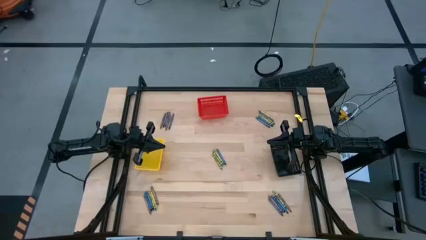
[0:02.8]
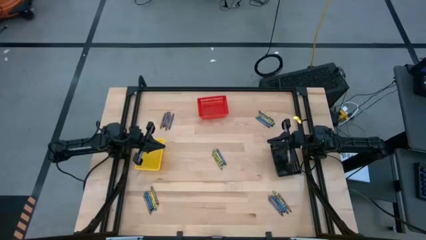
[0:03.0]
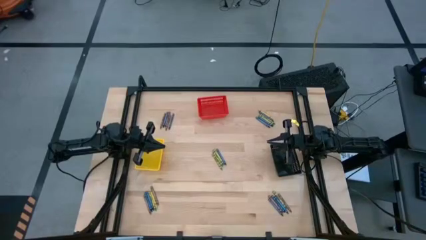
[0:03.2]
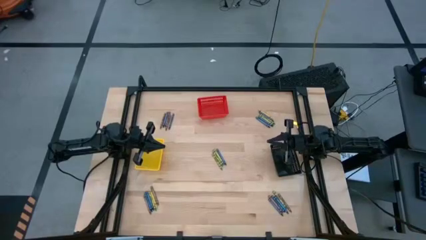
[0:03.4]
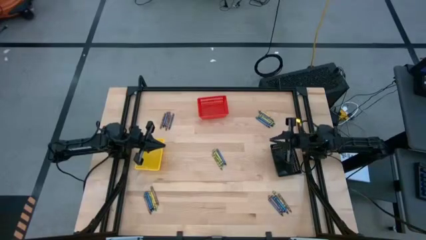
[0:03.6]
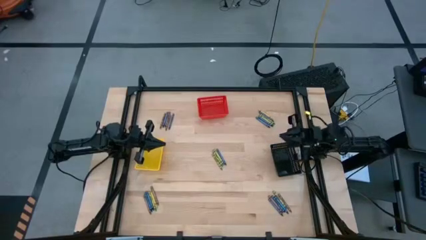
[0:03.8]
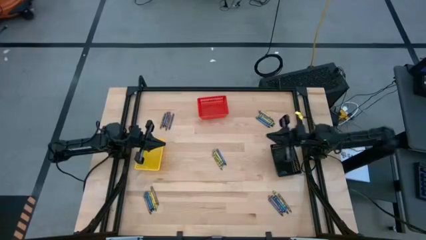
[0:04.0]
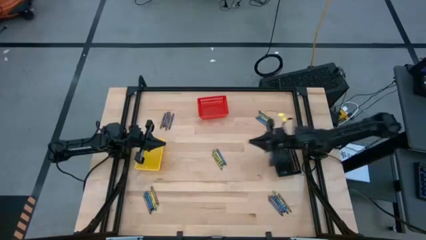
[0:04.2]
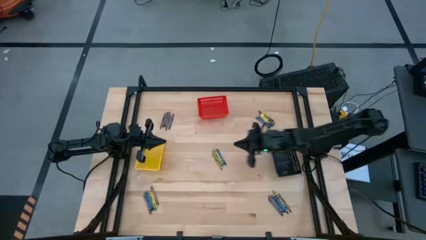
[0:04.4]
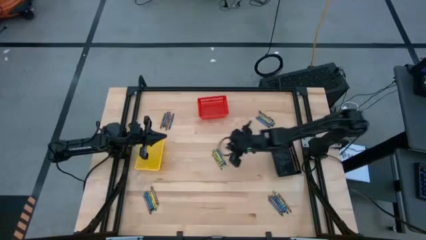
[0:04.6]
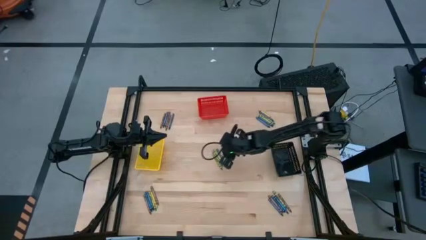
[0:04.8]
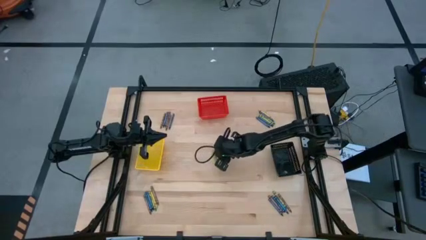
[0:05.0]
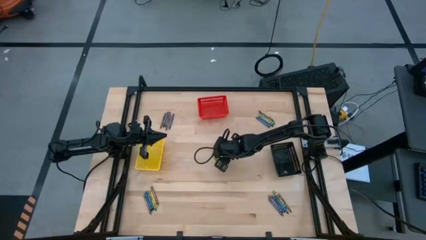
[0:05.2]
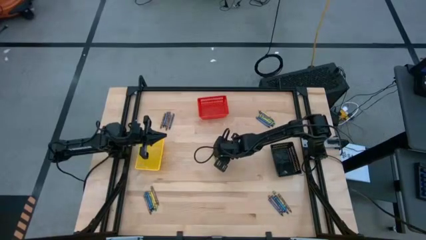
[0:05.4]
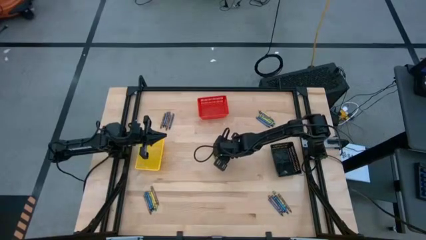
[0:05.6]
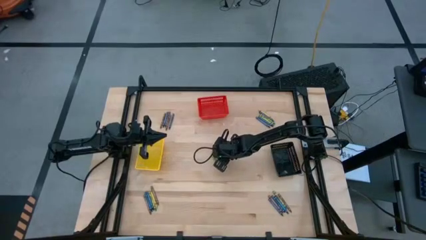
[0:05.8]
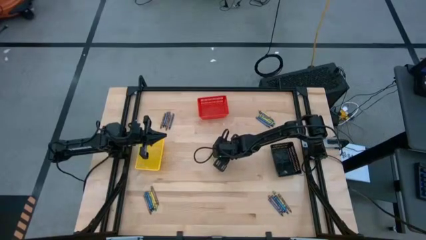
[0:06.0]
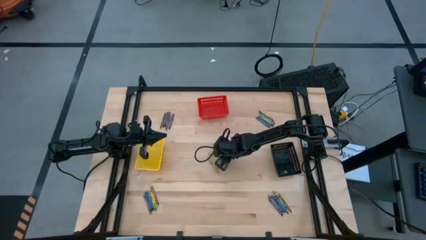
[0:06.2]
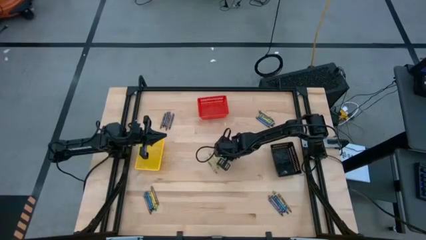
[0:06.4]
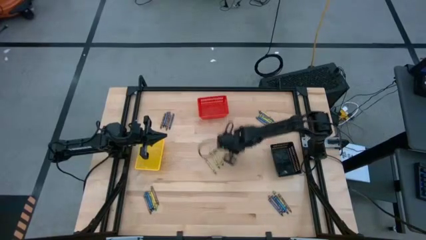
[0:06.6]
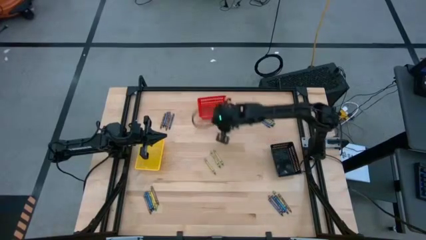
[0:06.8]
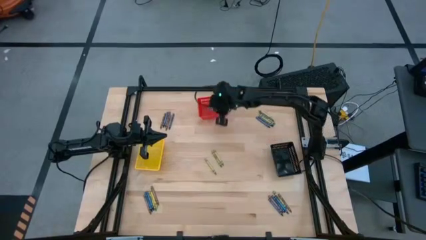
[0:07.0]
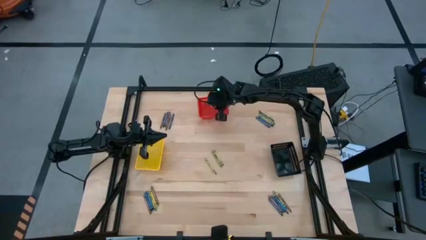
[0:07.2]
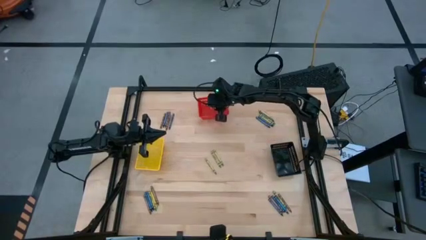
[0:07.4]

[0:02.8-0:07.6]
Task: Sort crayons
Put the blue crayon into the red bin

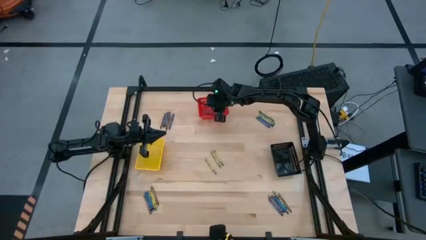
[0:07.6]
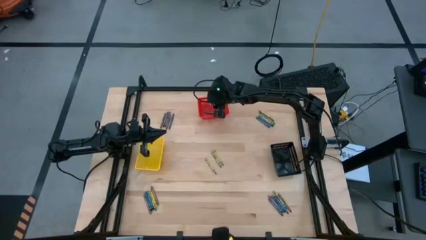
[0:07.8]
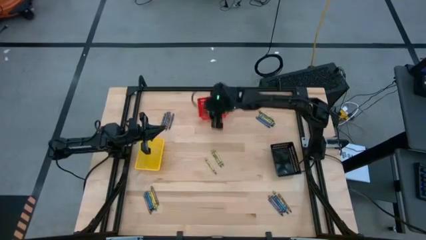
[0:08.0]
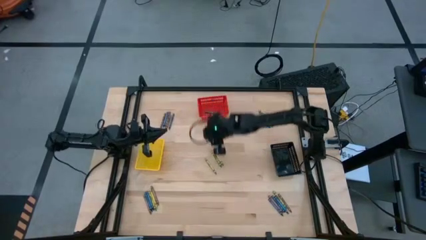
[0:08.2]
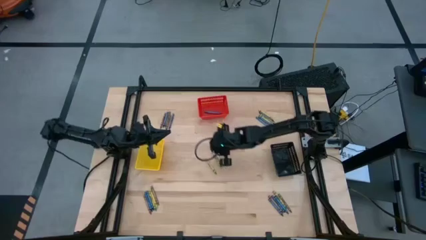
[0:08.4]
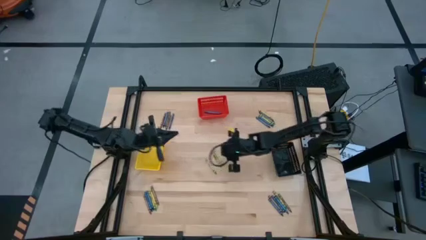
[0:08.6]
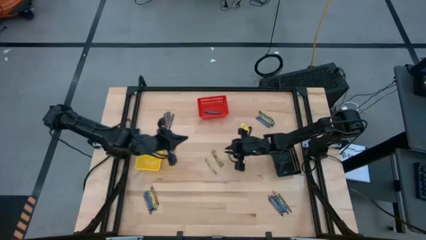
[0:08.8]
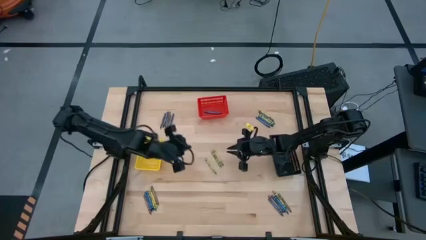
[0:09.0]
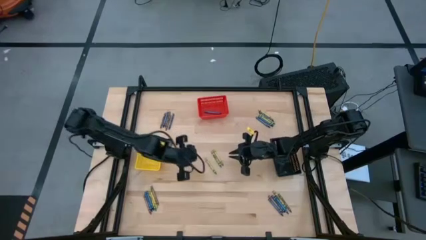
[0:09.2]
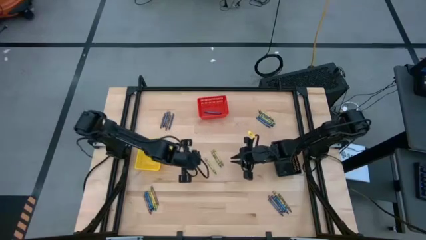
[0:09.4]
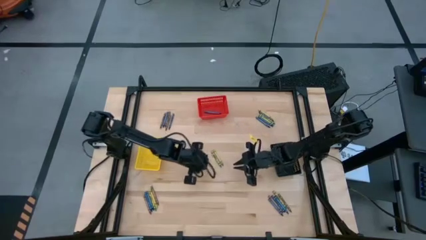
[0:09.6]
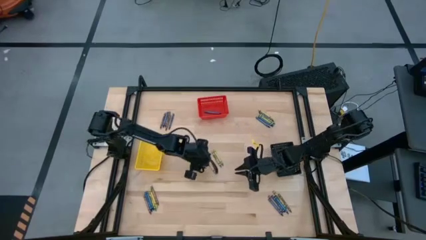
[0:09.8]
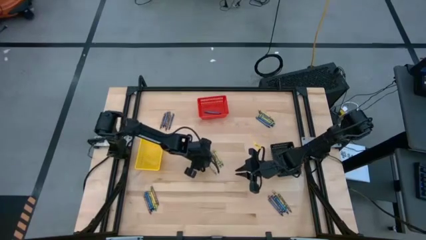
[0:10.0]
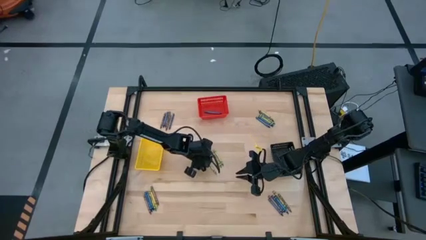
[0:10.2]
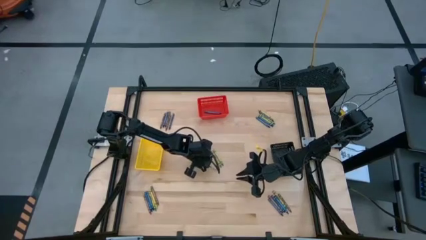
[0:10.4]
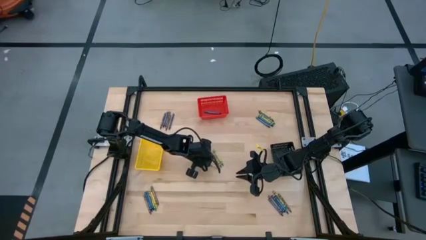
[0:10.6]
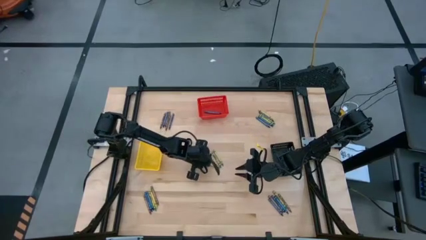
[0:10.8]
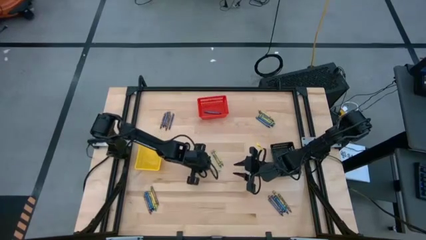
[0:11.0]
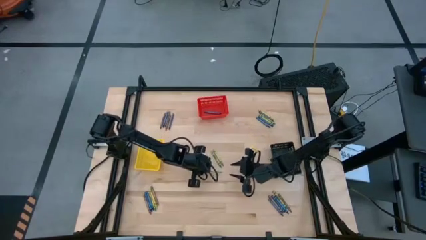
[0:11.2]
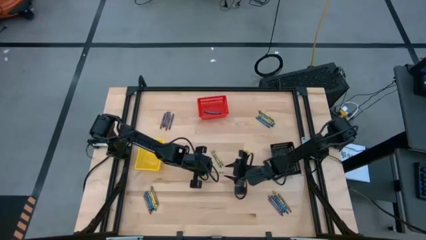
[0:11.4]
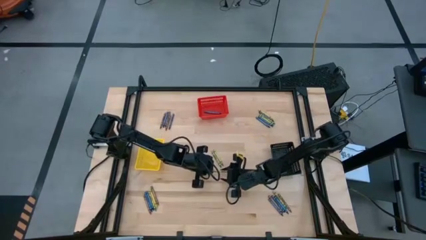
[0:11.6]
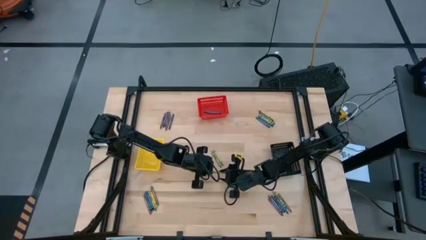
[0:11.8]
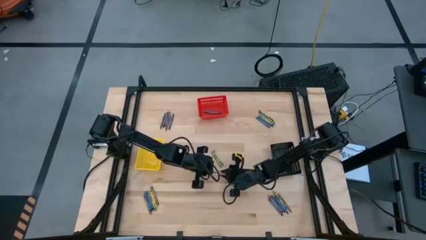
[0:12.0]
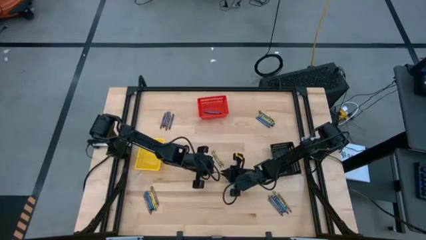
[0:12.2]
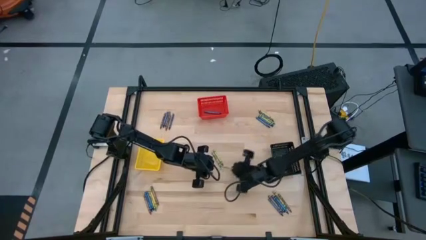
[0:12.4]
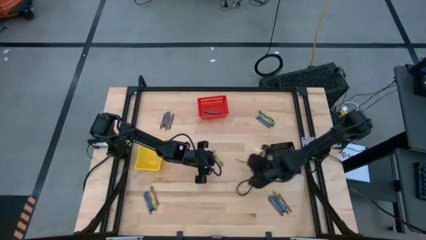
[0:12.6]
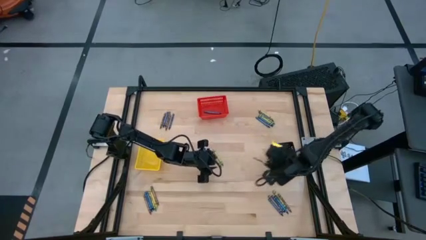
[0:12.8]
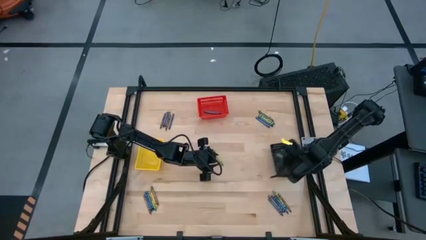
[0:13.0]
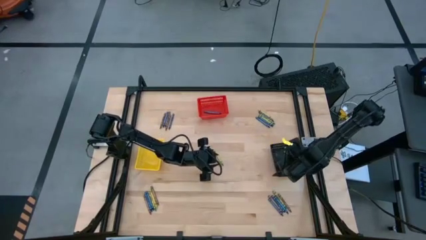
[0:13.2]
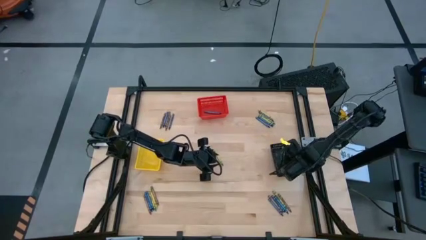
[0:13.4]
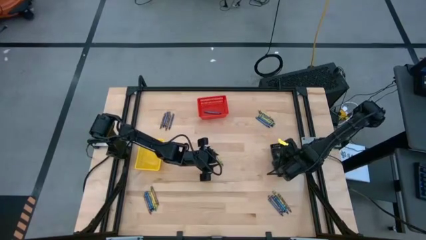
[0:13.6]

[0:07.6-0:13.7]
Put the green crayon into the black basket

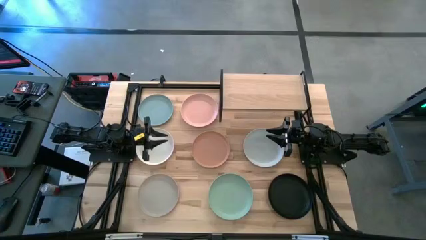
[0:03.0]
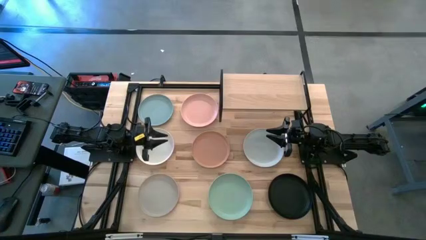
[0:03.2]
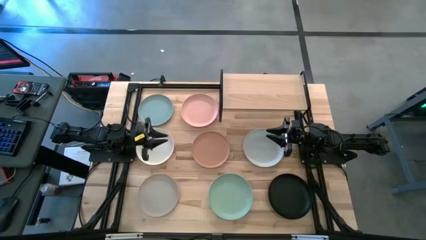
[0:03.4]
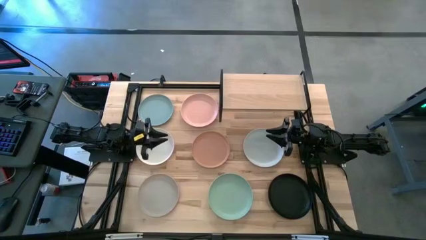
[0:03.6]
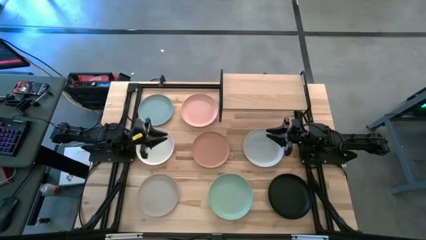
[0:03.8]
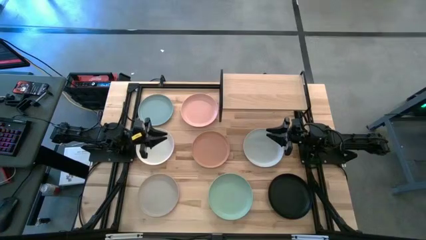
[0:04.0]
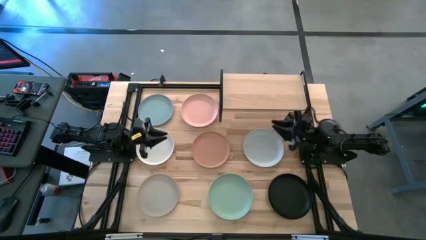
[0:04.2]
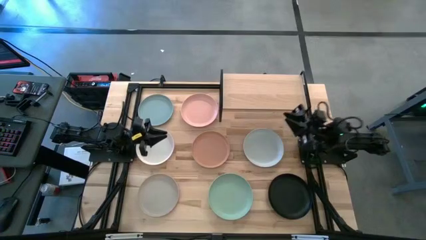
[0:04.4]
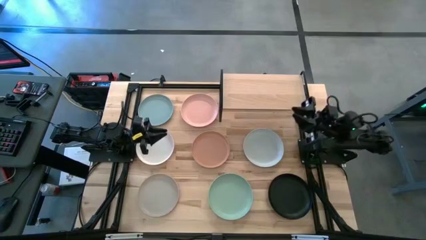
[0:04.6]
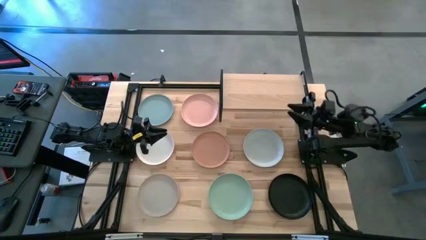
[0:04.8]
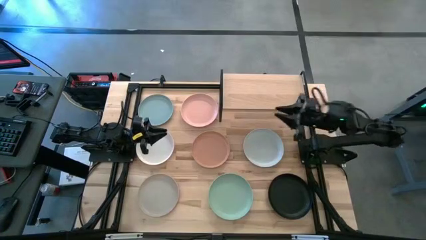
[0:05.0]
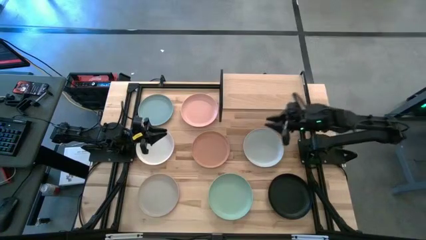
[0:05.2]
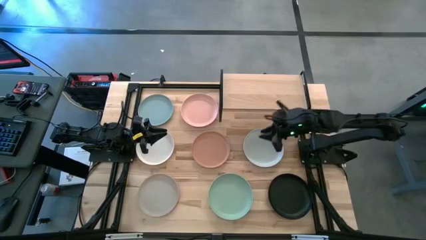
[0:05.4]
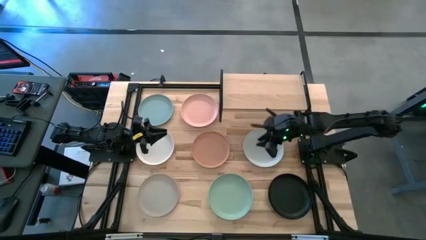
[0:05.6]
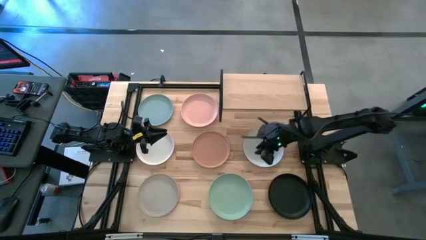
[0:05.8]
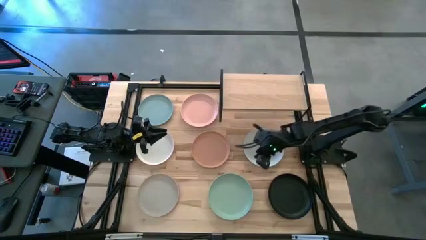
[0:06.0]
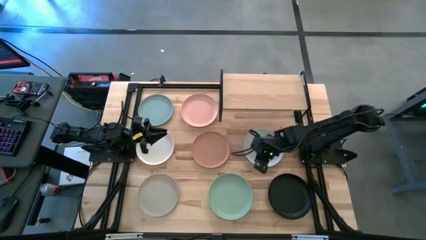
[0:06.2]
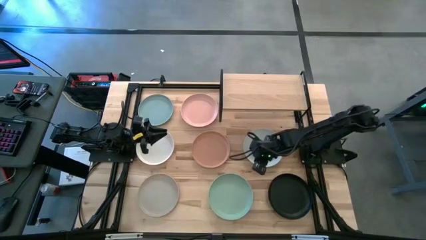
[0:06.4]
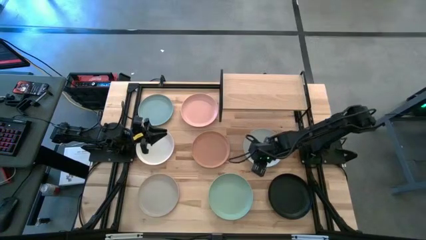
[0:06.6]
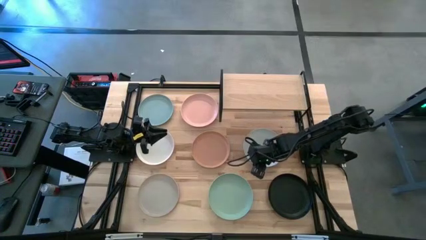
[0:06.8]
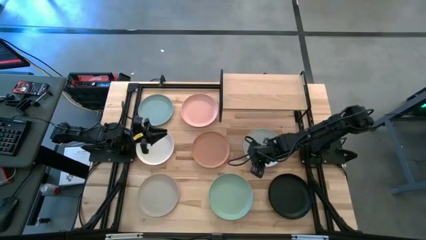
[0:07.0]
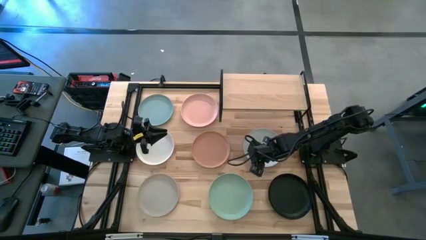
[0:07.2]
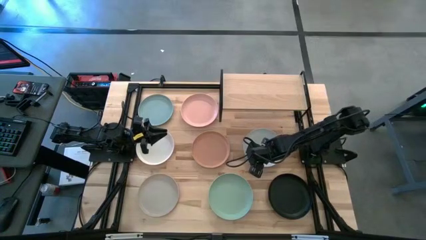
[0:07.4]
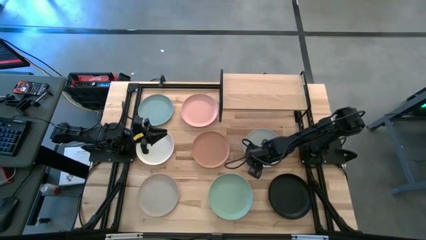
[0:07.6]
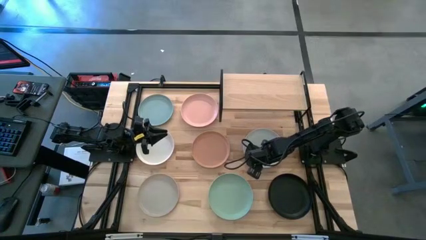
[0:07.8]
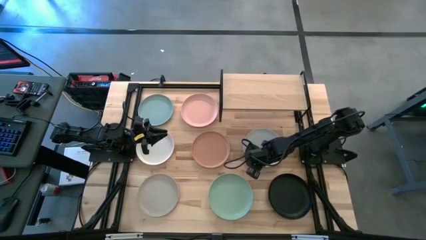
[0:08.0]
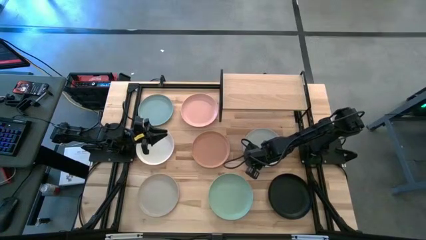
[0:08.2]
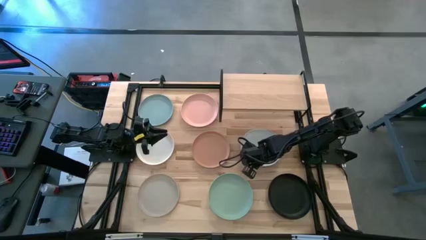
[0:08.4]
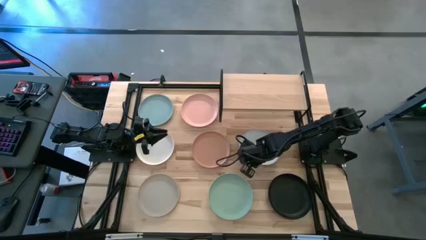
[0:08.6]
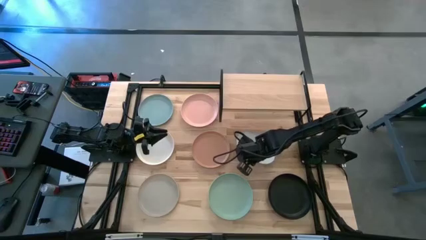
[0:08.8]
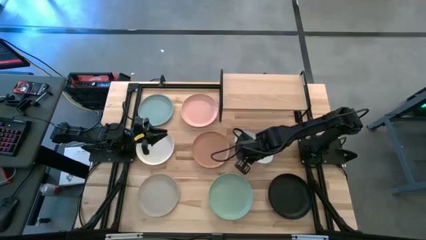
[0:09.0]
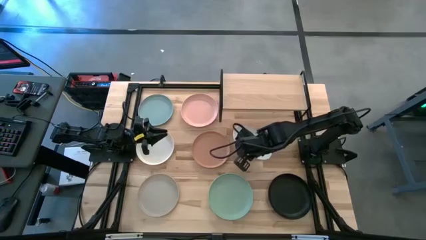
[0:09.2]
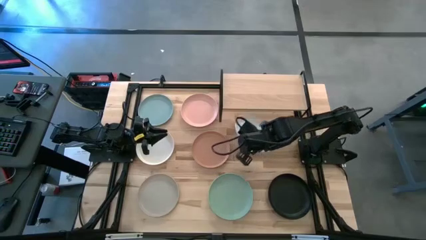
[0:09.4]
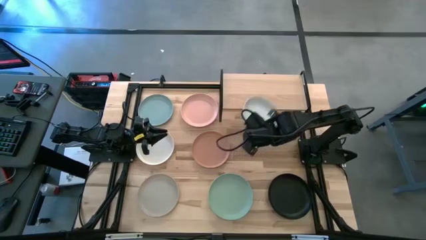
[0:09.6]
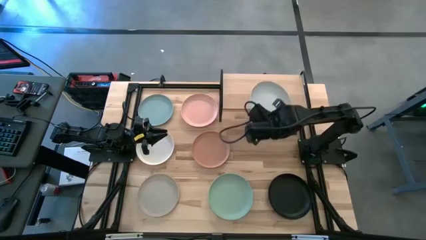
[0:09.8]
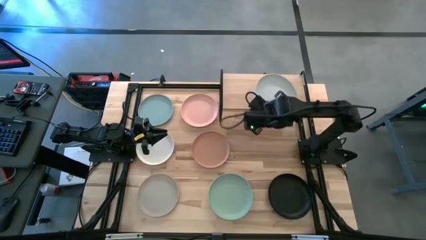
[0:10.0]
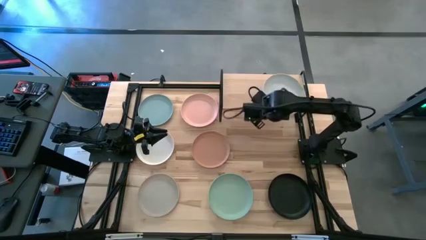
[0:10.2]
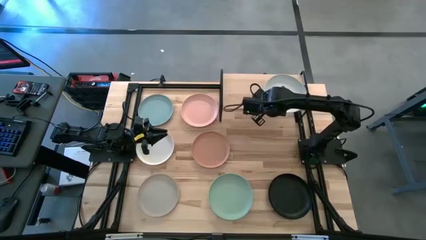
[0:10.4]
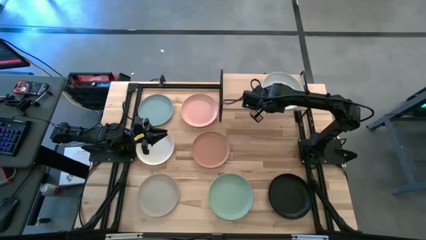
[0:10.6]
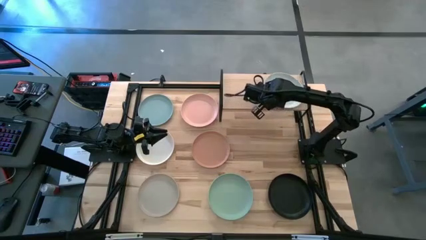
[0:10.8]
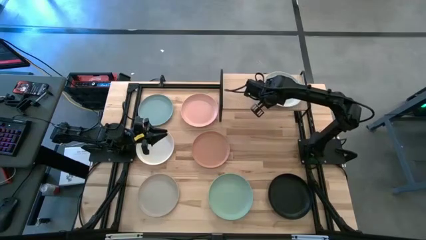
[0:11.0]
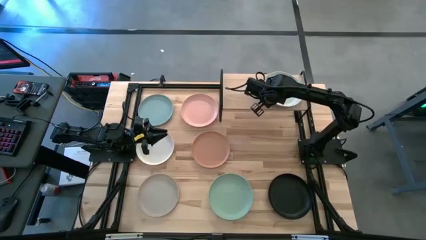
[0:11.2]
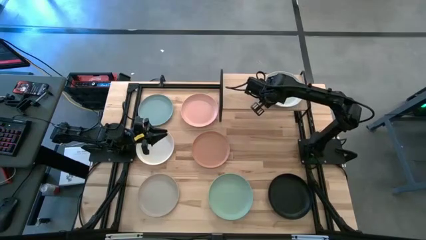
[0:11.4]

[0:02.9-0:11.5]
Task: Place and stack plates onto a shelf
Put the right white plate on the shelf
